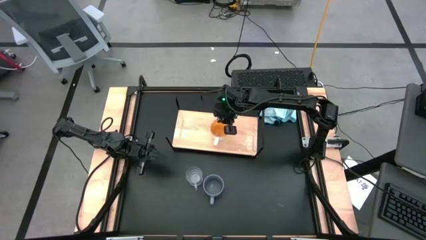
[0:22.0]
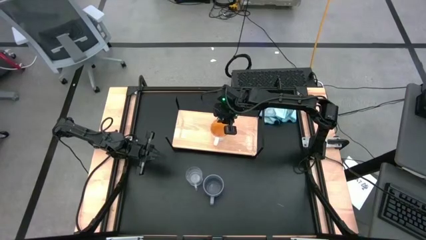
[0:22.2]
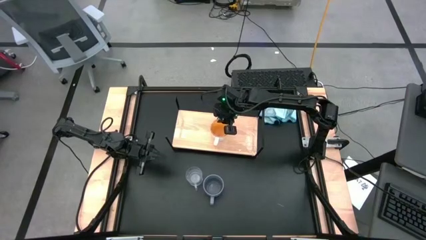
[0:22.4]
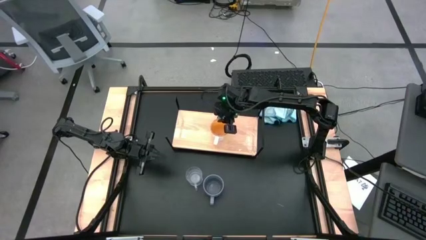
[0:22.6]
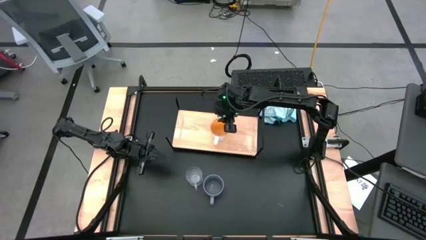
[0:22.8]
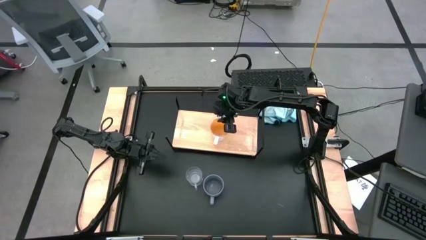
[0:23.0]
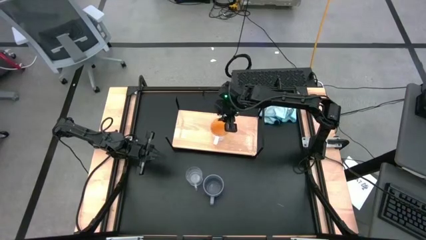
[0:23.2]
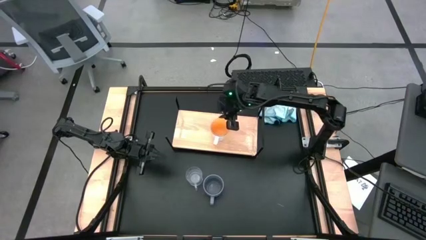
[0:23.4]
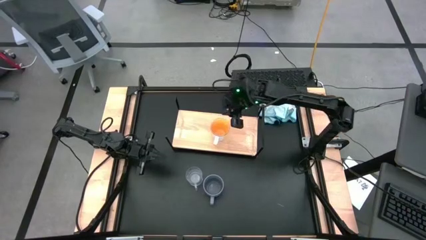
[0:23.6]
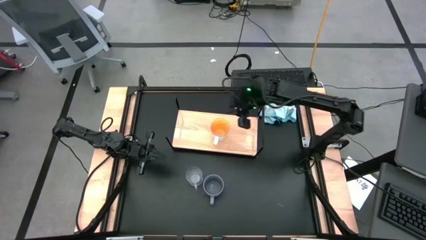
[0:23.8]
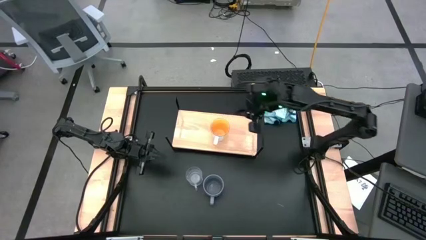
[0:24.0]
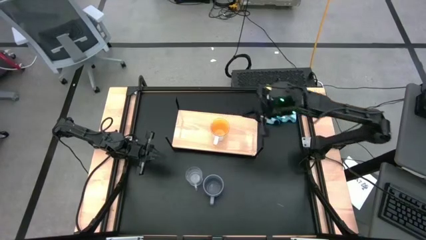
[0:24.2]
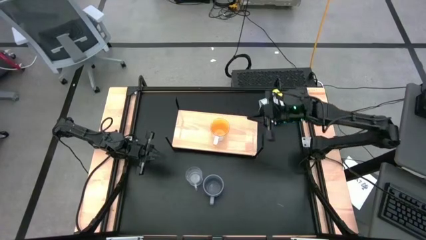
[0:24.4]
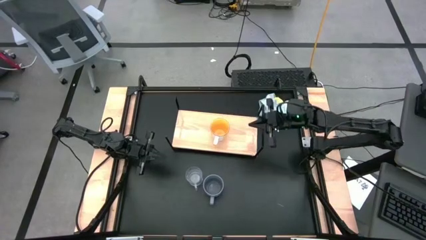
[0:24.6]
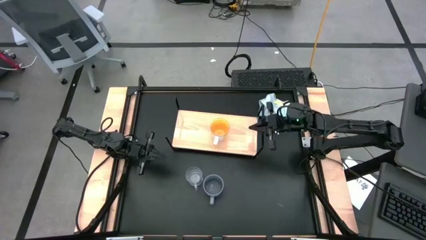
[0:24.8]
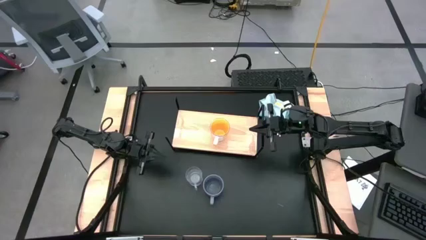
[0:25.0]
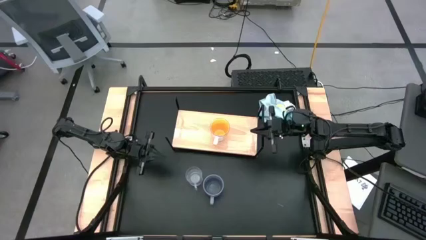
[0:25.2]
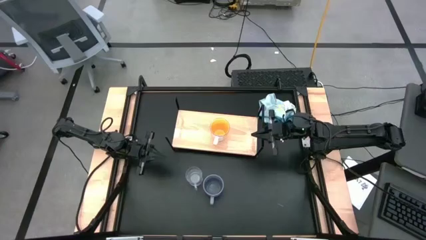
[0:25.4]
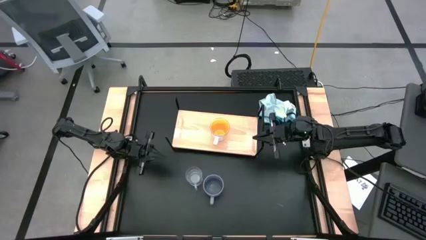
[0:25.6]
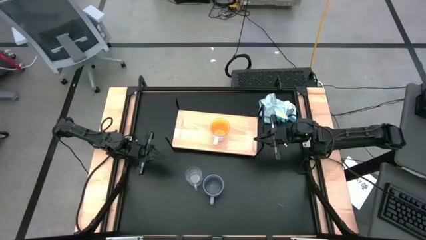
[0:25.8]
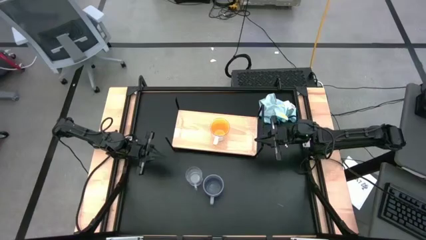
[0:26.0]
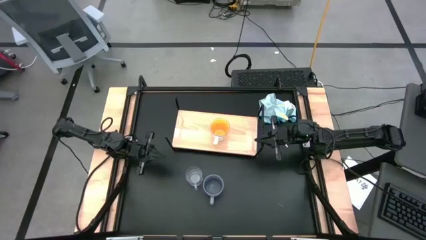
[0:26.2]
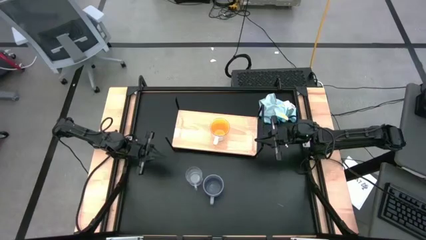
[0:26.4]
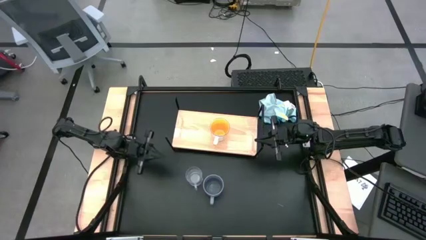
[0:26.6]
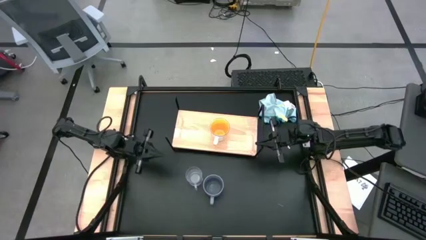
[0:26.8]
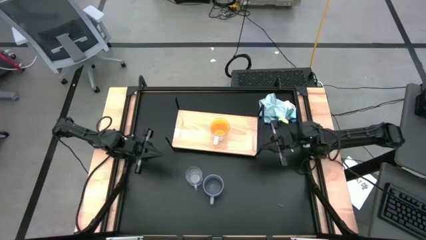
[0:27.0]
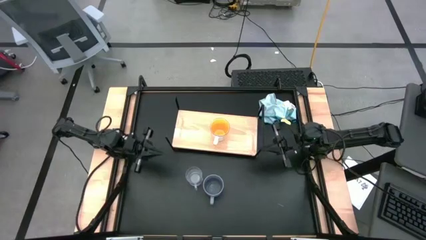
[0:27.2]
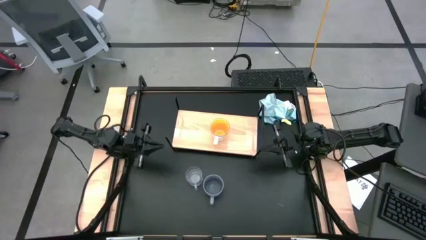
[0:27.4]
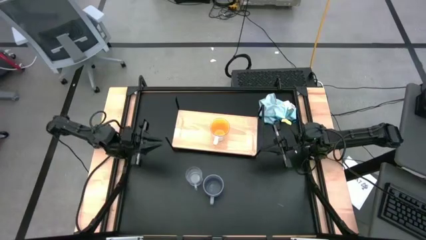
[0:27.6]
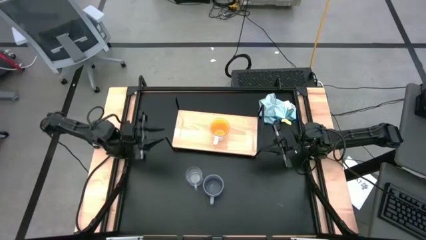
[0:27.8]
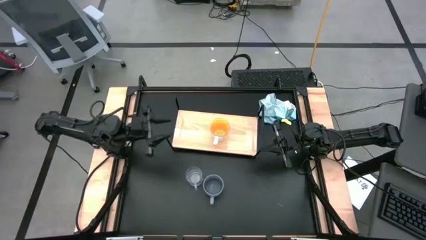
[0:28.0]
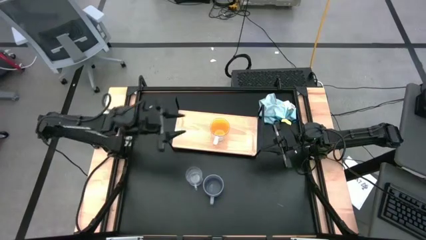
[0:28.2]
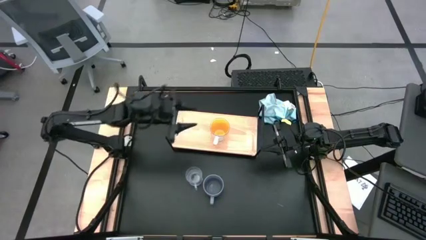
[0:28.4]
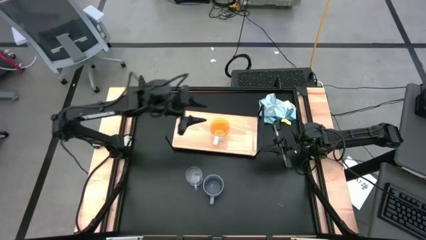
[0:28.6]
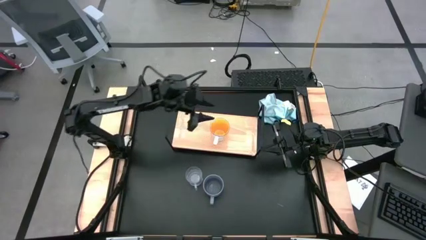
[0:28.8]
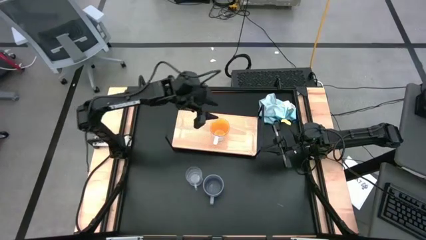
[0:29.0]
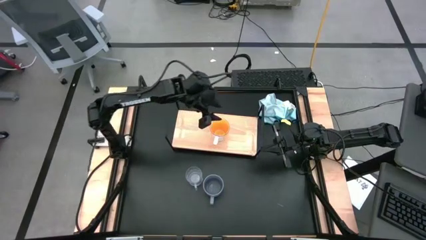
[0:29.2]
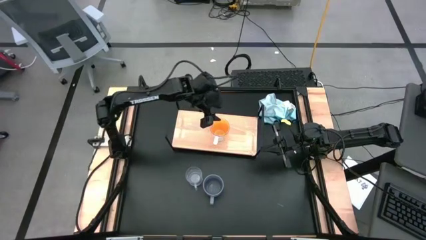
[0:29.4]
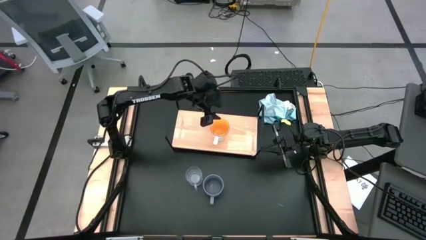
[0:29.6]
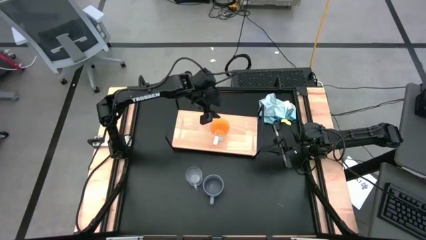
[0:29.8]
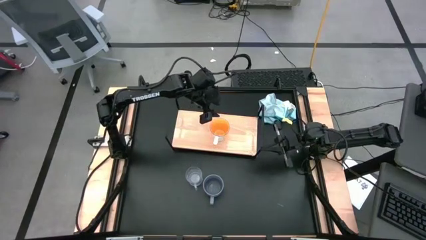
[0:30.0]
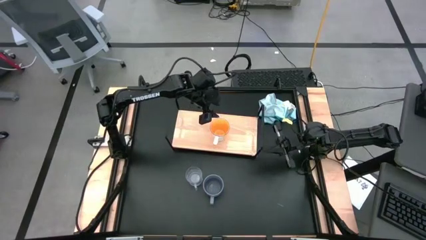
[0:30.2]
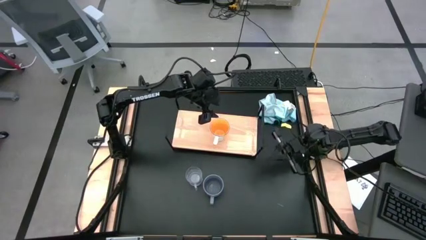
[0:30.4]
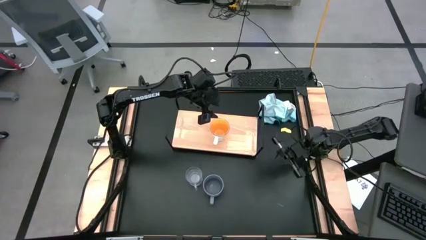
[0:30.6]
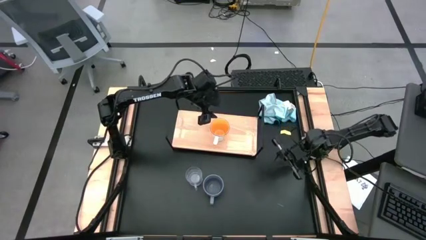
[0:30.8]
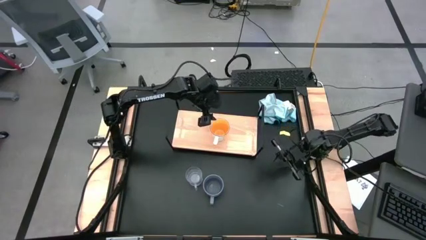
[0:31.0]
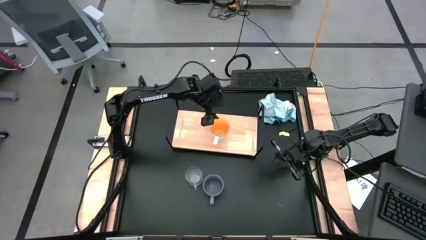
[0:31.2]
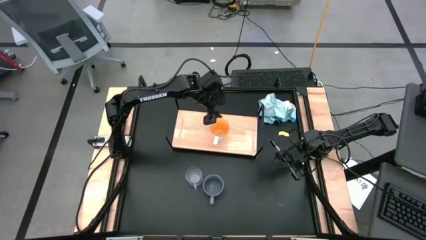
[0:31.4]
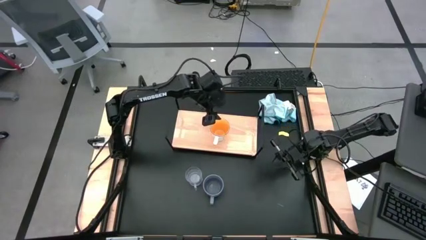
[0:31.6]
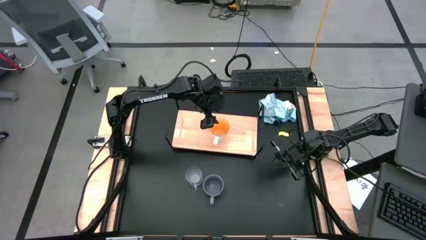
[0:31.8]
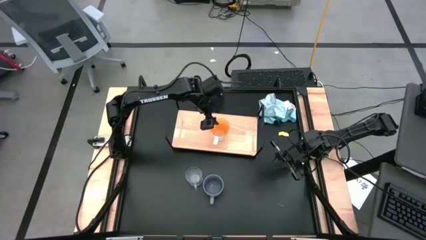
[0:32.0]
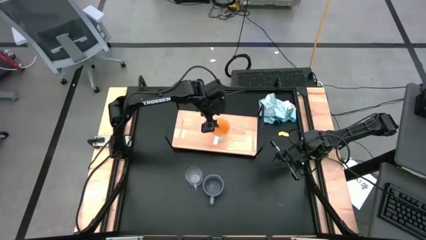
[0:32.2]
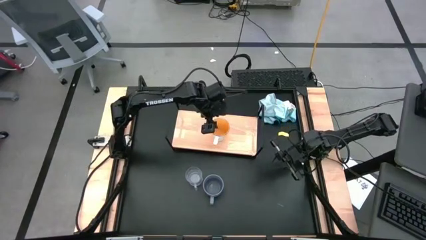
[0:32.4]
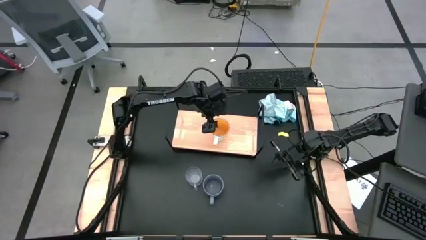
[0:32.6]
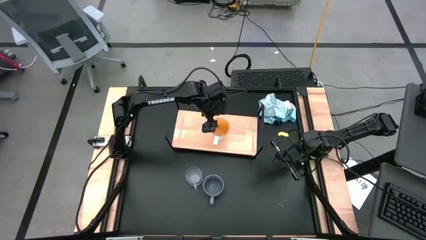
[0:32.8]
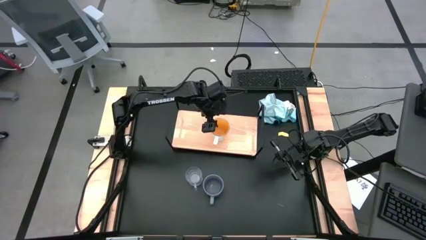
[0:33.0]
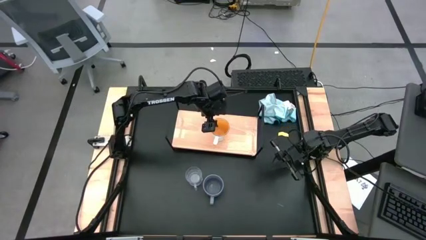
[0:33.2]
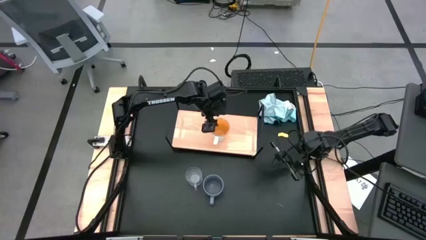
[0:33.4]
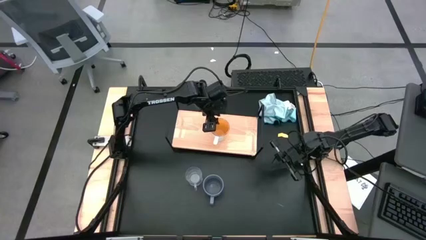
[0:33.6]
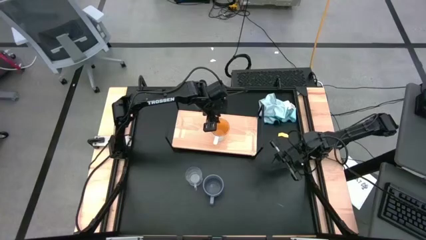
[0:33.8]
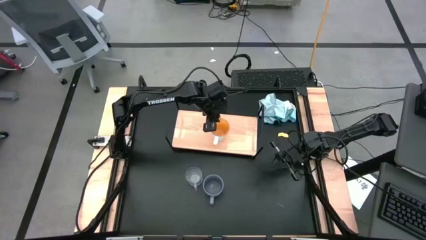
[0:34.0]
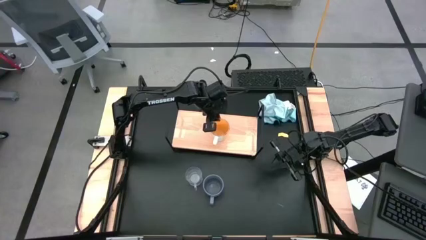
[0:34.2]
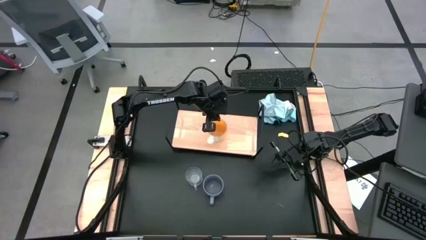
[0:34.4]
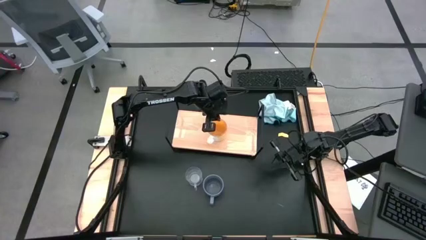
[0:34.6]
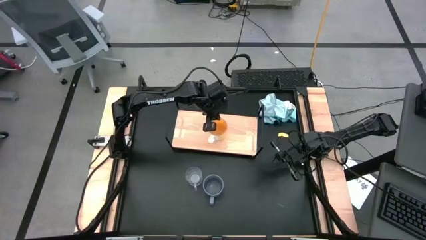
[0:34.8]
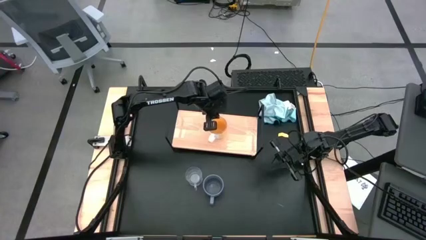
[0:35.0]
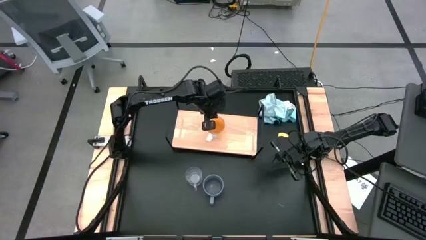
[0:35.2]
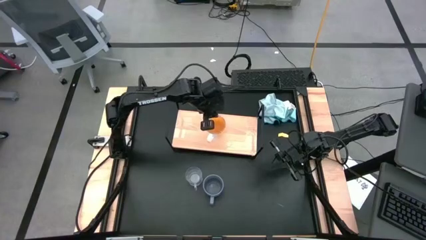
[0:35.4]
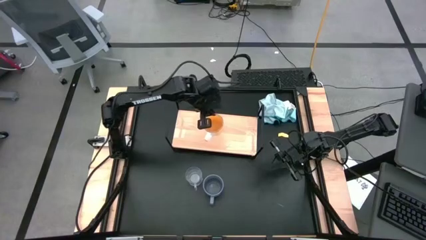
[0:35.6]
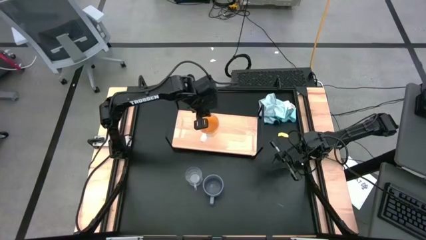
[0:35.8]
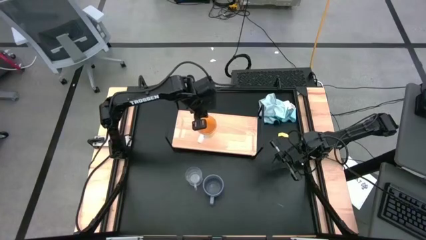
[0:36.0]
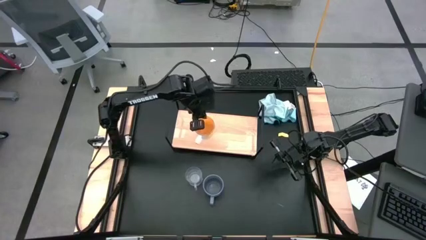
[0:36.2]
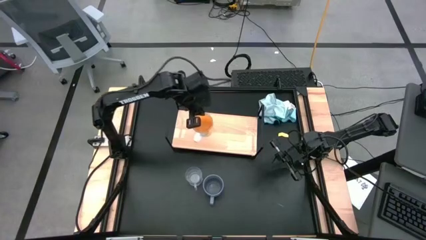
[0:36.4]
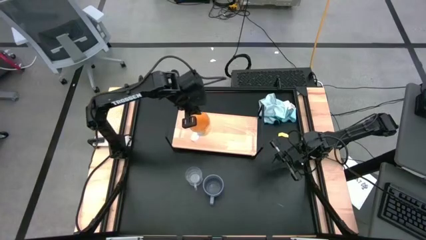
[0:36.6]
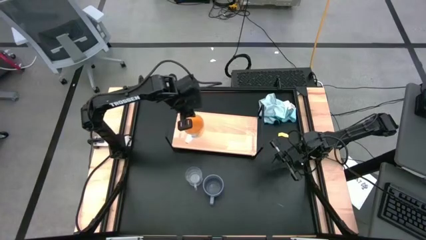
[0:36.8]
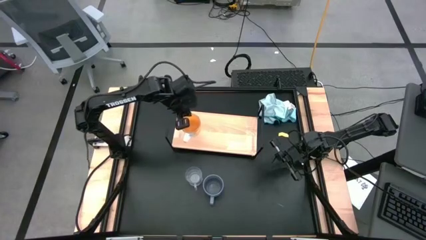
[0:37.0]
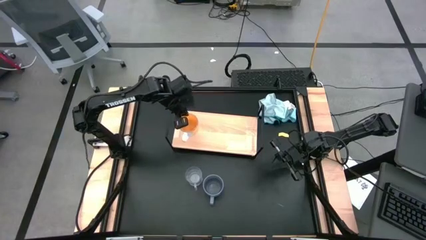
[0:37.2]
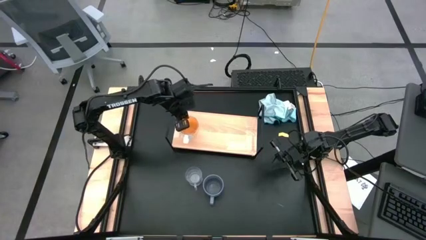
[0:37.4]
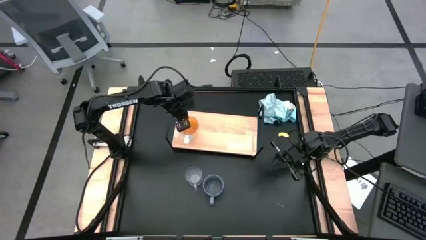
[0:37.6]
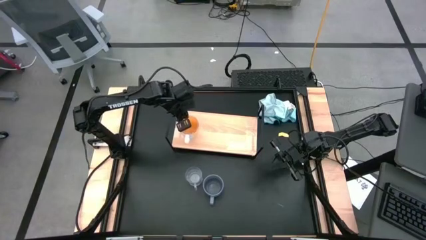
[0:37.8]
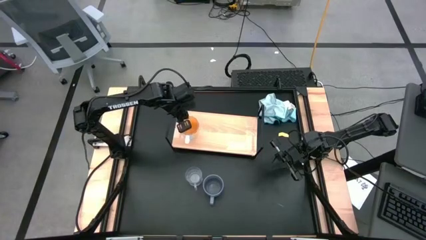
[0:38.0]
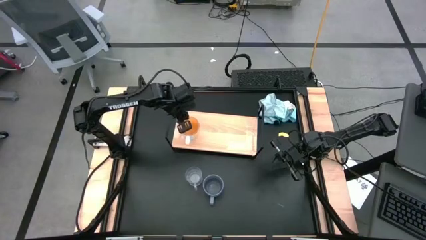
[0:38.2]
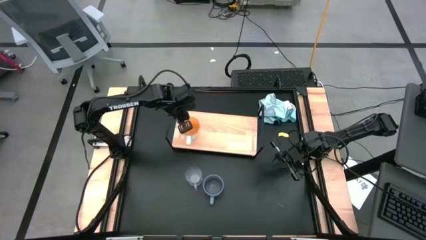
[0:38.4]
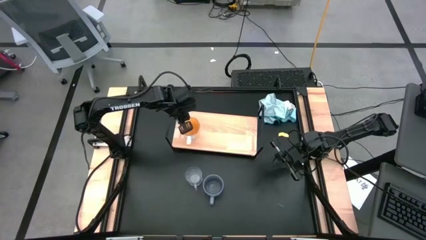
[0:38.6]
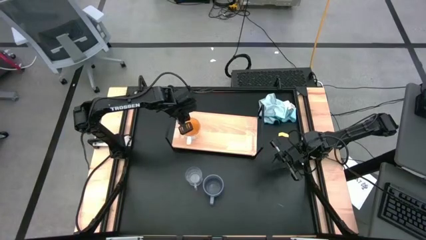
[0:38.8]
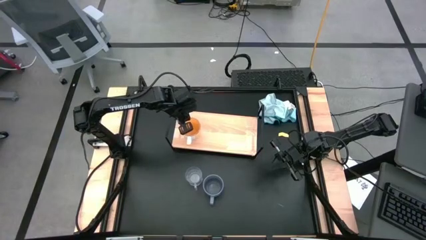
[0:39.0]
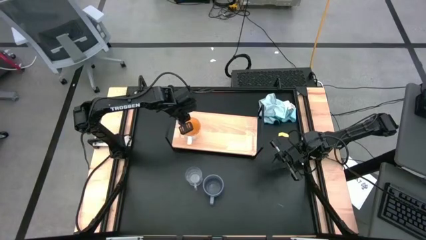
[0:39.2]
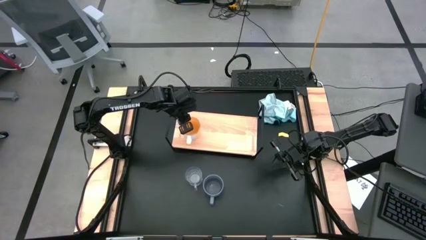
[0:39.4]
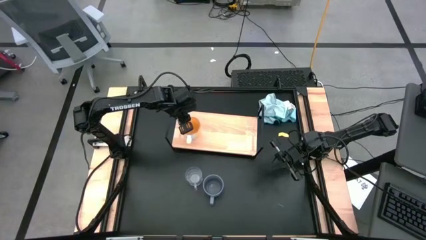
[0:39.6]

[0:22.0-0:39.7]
Task: Stack small to large cups/mugs on shelf
Put the yellow mug on the shelf
